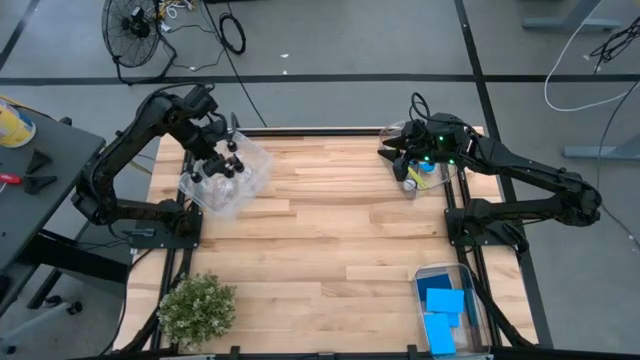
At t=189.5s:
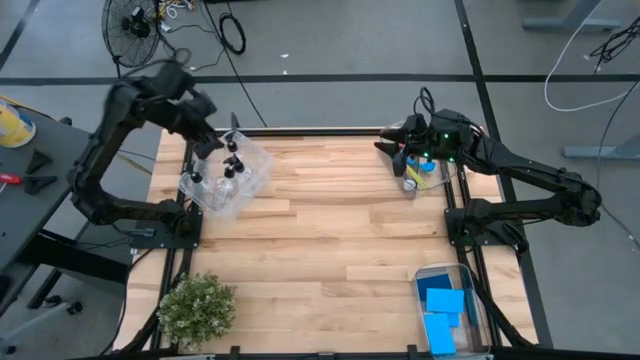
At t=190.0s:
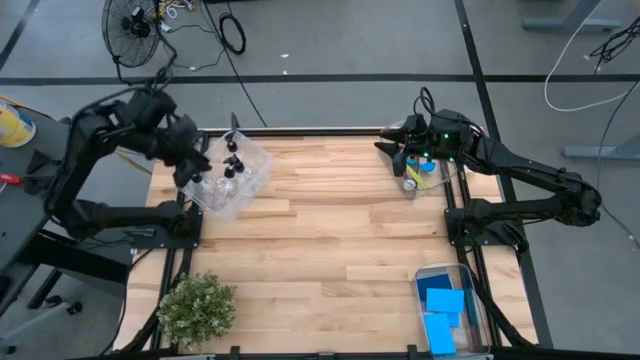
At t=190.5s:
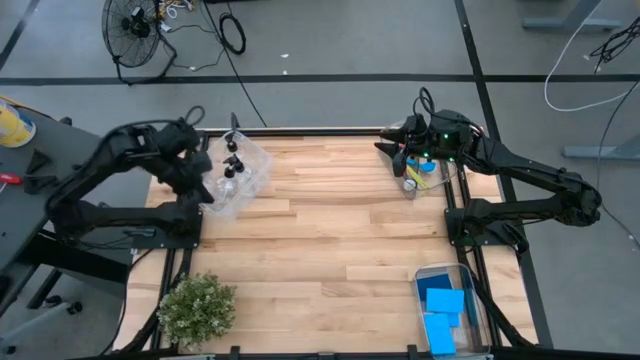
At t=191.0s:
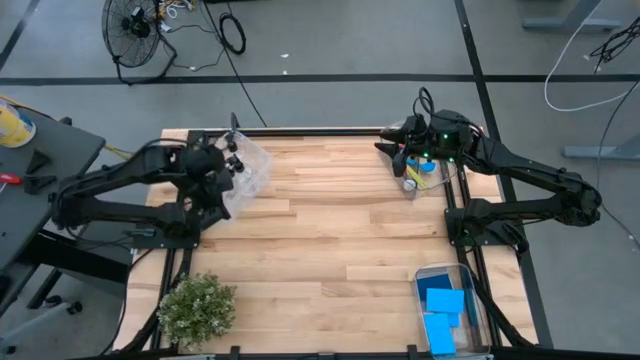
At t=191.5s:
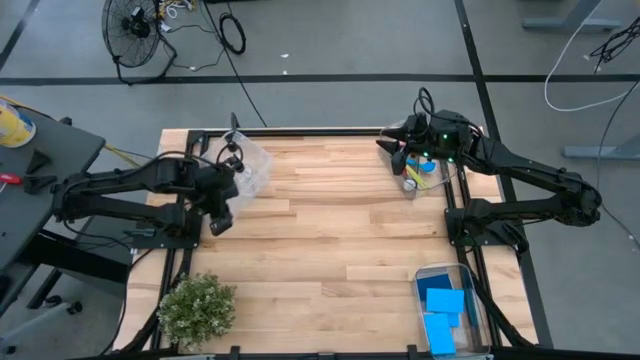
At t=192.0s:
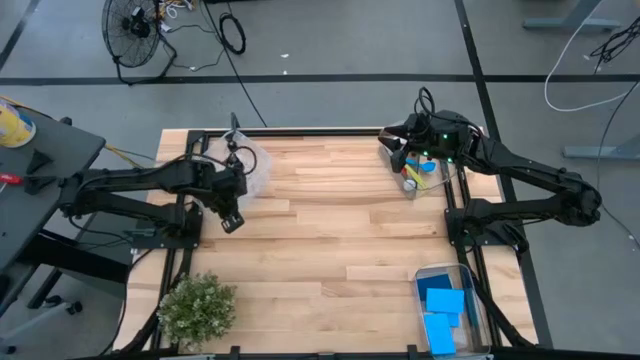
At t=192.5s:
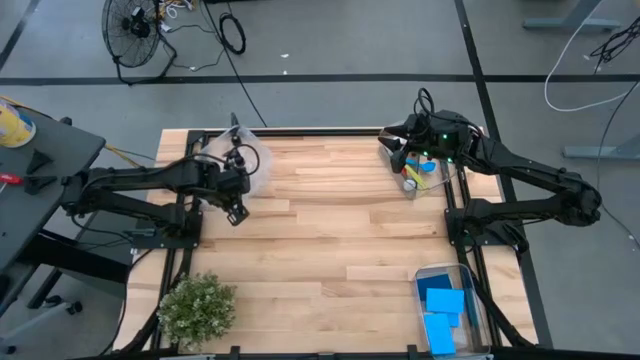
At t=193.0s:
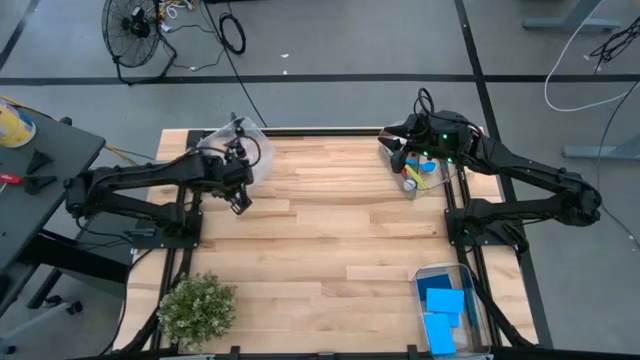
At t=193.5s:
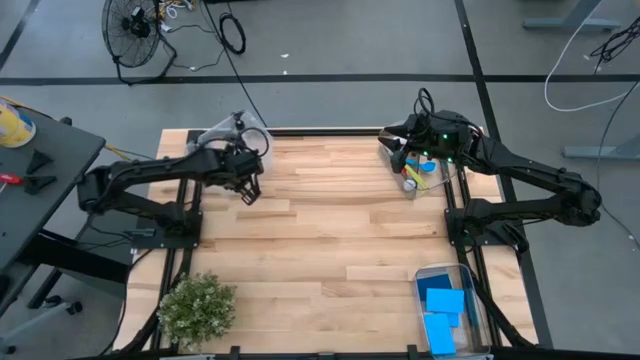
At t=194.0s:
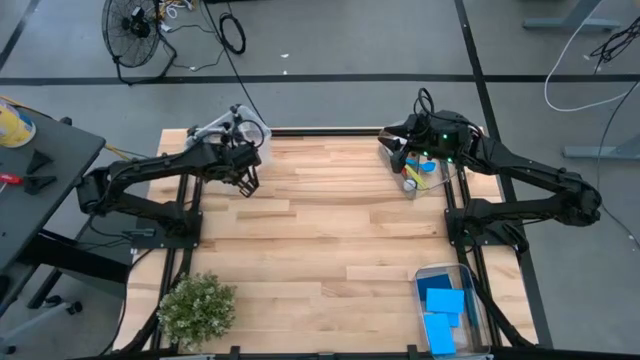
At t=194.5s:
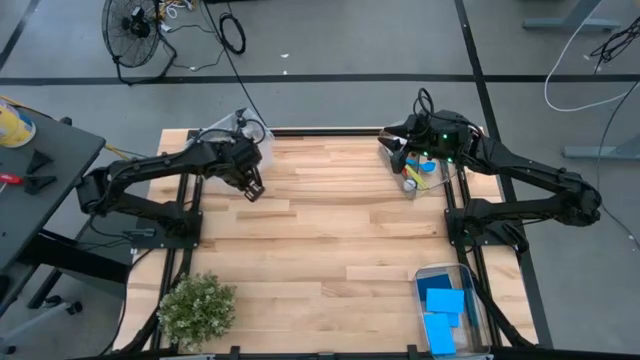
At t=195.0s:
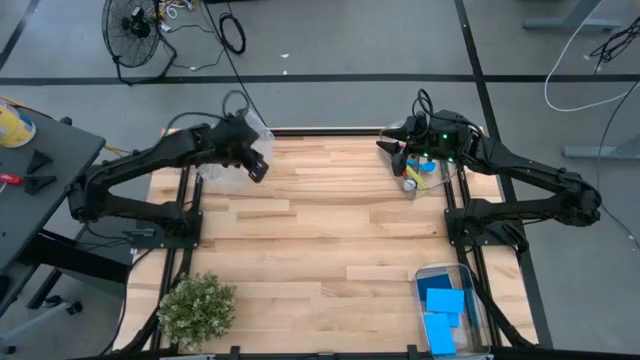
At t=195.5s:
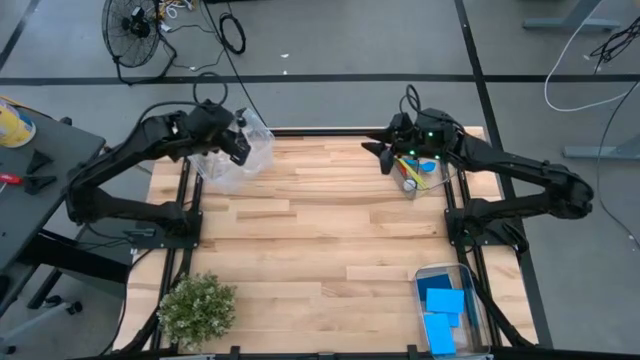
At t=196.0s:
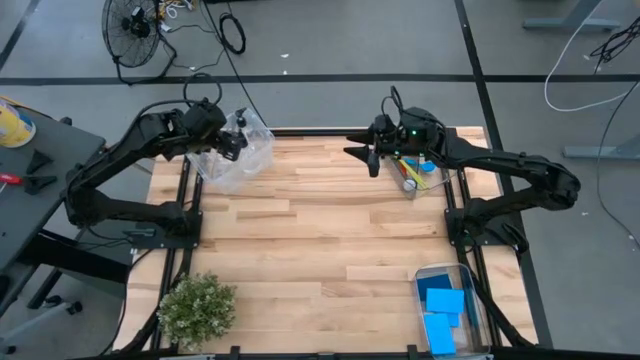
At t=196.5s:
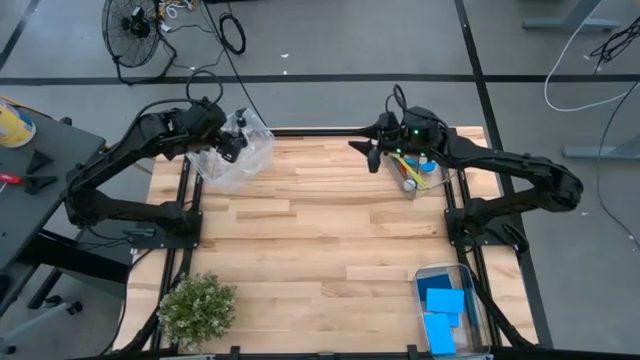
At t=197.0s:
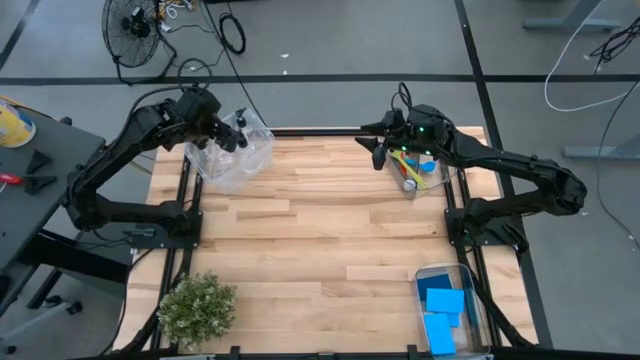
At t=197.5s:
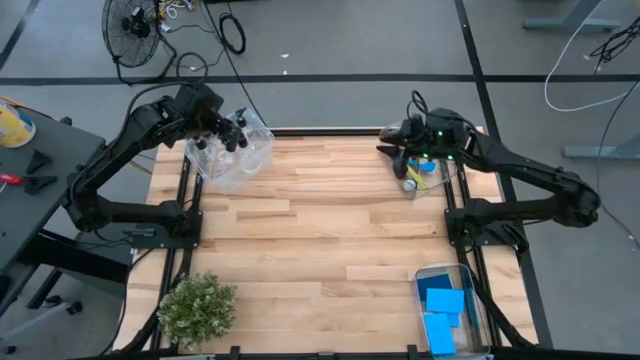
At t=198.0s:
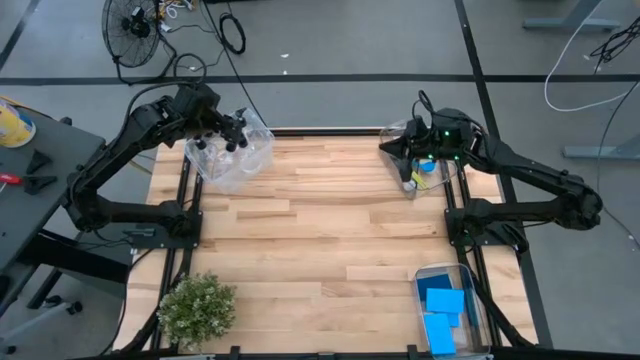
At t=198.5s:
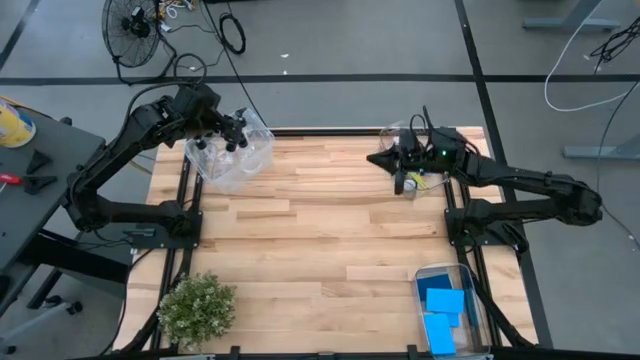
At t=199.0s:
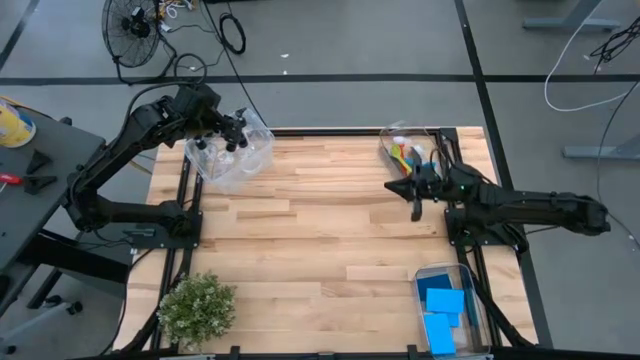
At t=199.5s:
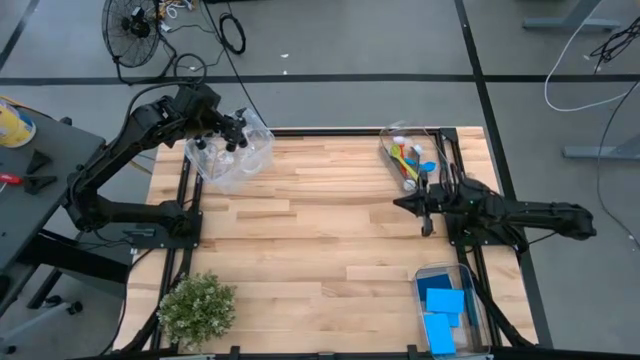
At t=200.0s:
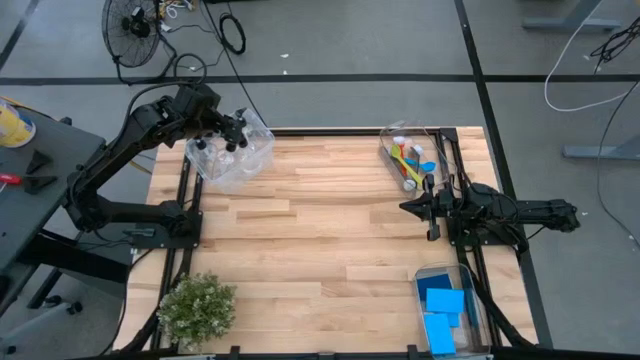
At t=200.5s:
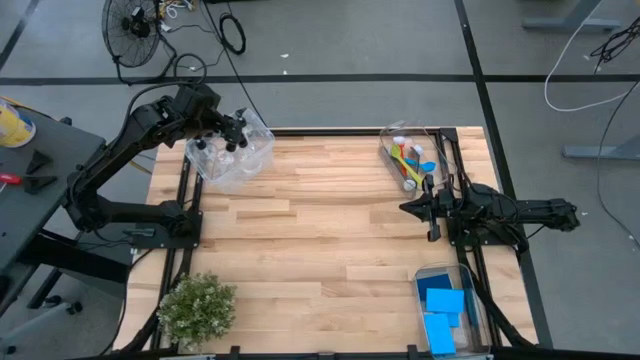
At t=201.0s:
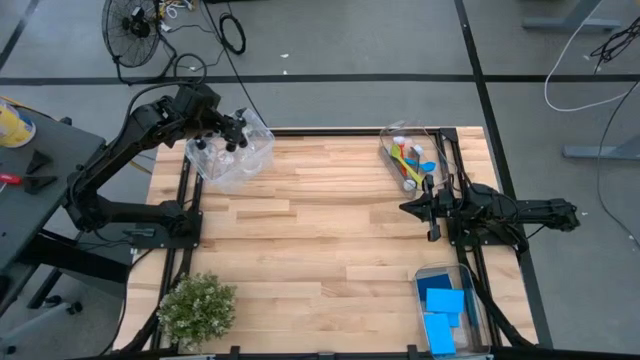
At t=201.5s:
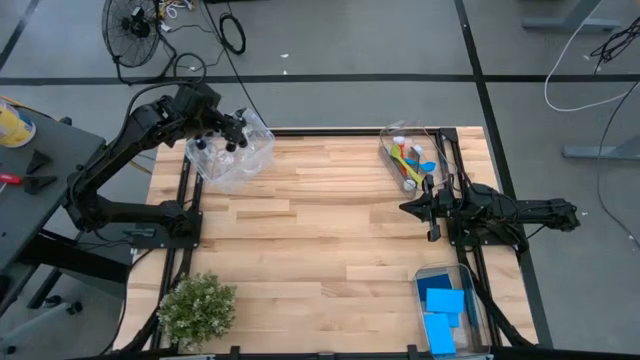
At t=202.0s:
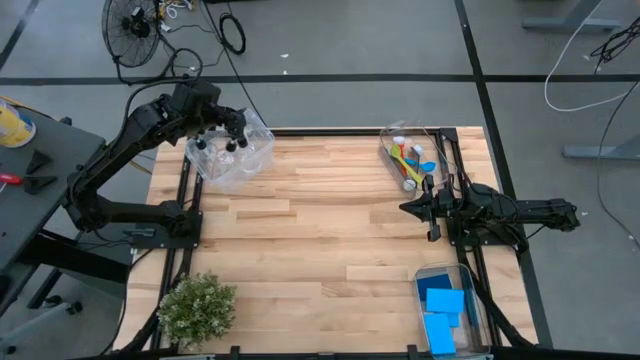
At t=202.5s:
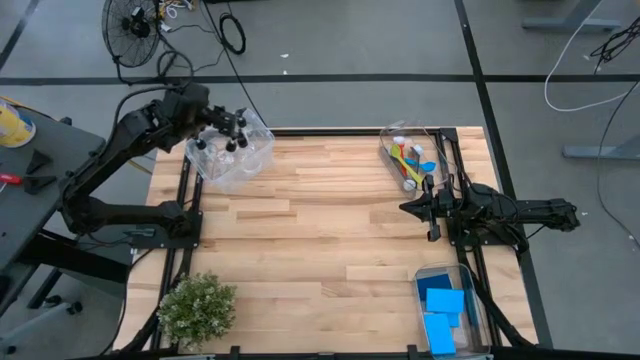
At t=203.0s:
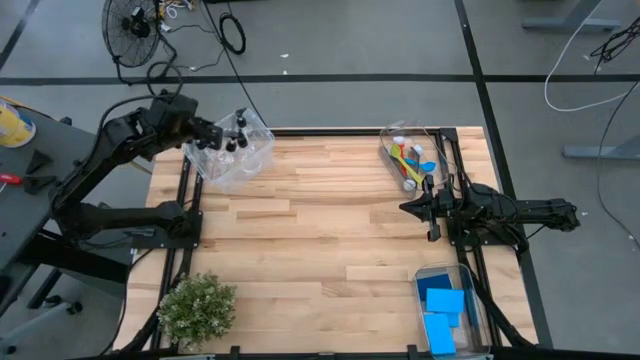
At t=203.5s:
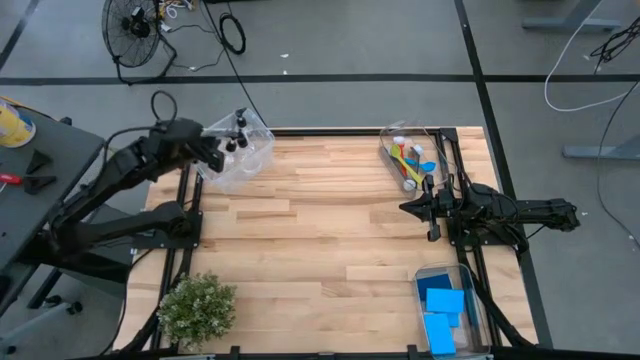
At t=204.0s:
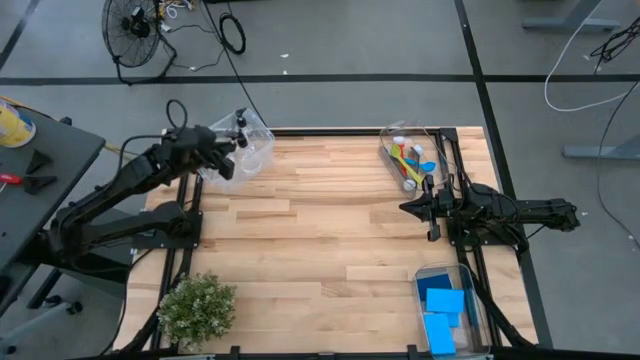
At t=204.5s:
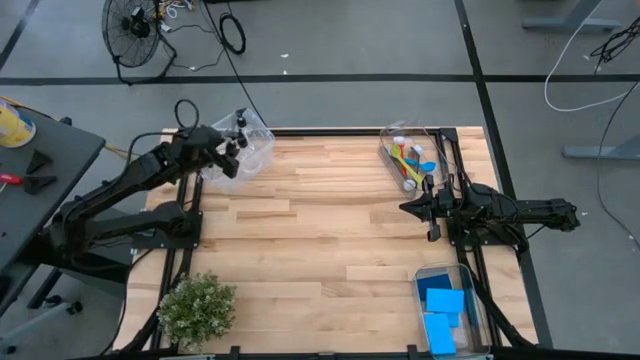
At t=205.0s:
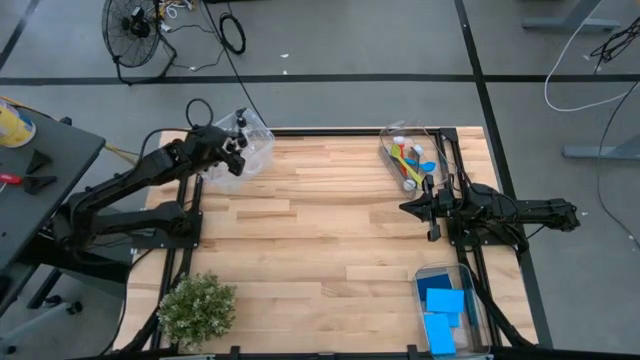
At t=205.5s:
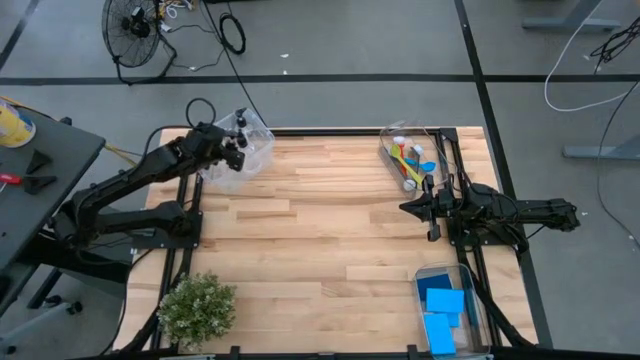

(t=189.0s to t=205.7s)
Task: Pick & Place Kitchen Sink Supplies
Return to Home Position

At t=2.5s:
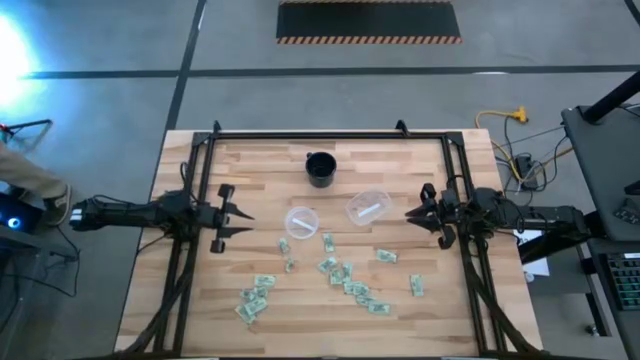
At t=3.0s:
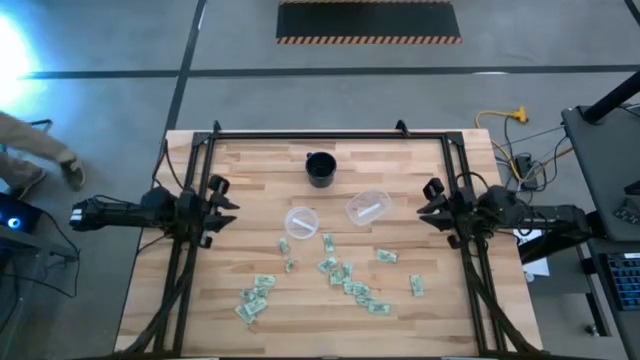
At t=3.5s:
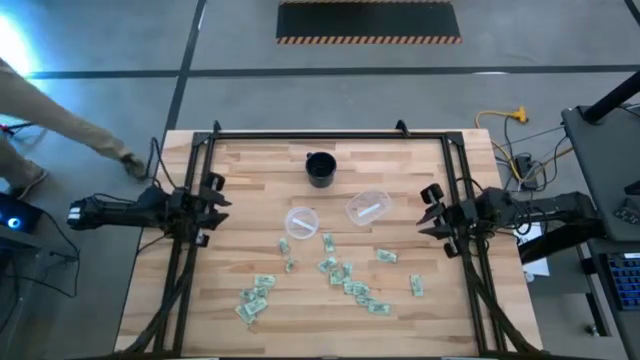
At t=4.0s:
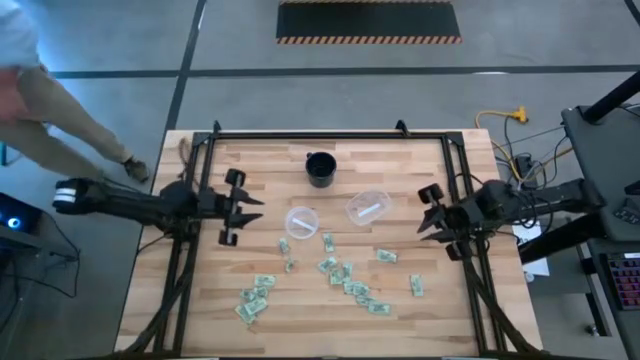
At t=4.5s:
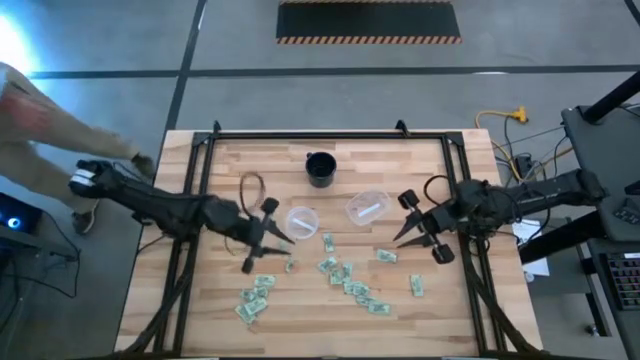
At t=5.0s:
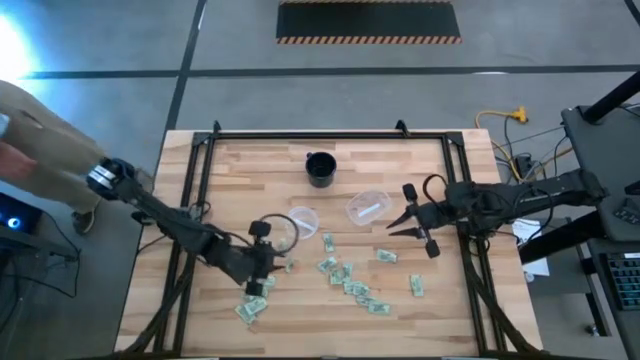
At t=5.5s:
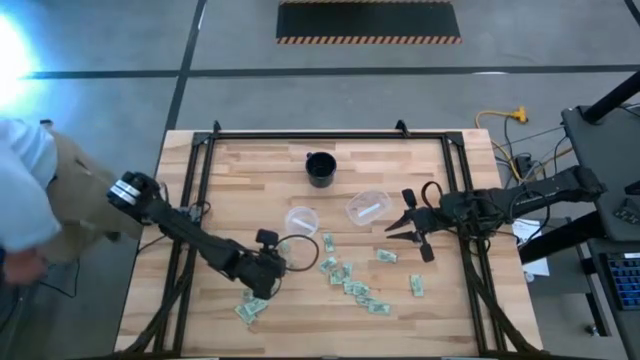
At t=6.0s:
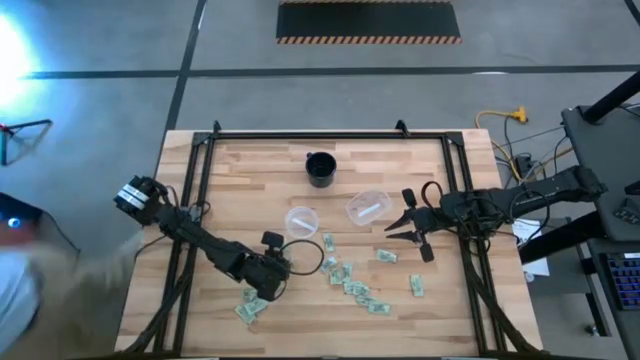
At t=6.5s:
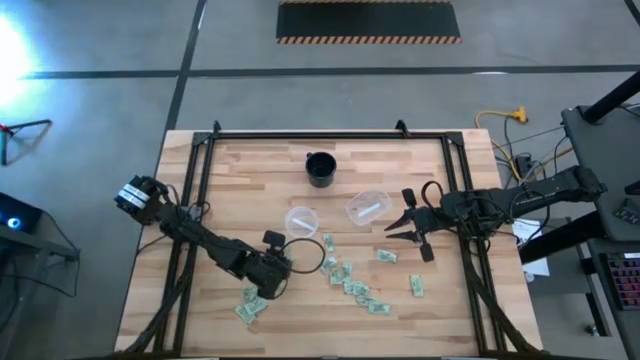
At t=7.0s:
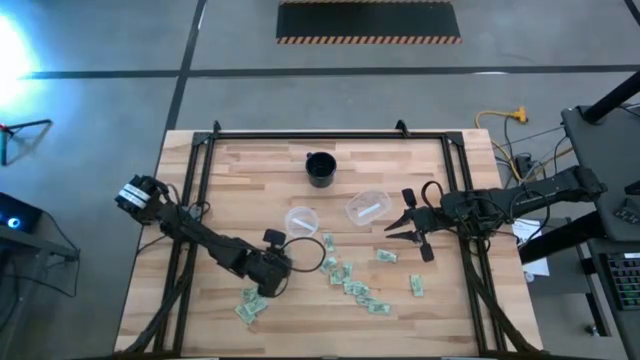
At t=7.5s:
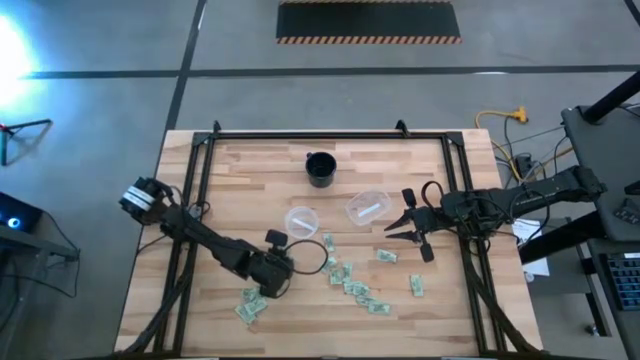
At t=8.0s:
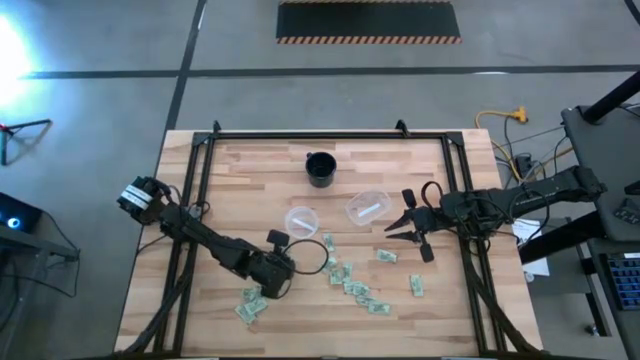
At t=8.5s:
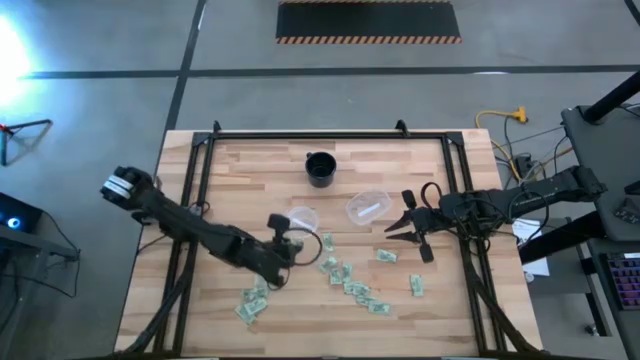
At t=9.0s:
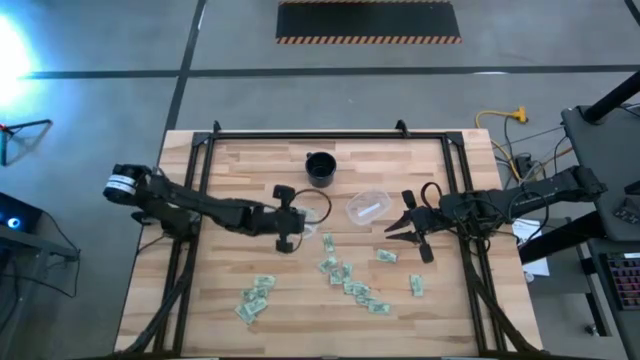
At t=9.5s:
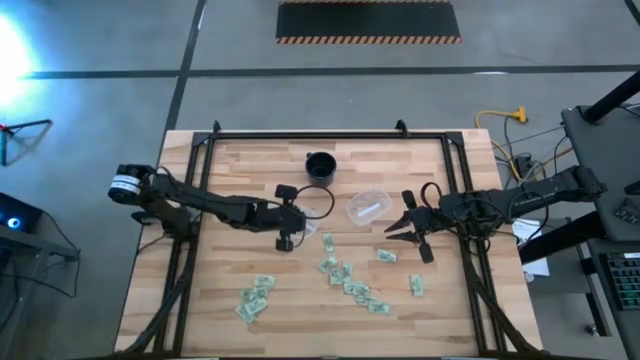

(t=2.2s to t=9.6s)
Task: Pick and place Stevia / Truvia into bins
Put the green stevia packet into the left transparent container
